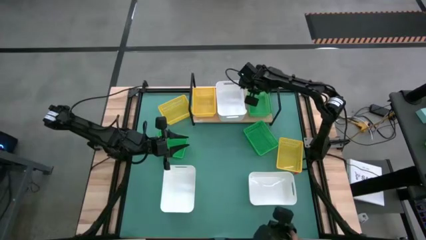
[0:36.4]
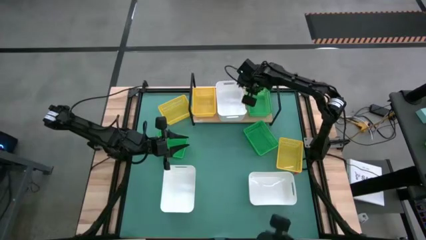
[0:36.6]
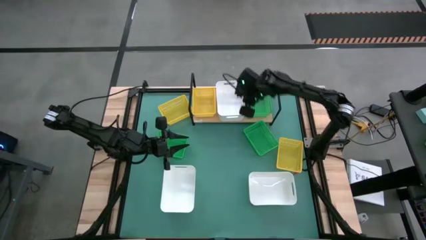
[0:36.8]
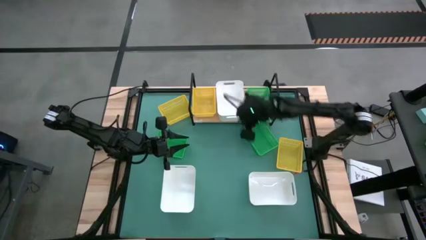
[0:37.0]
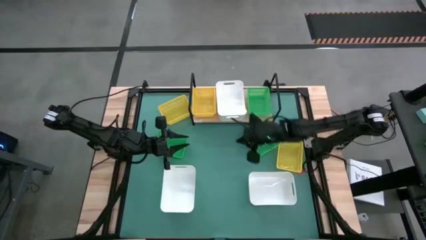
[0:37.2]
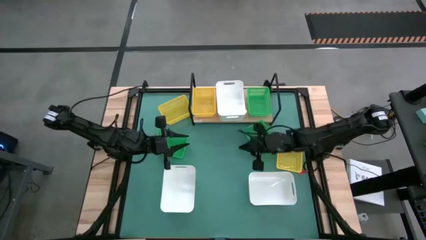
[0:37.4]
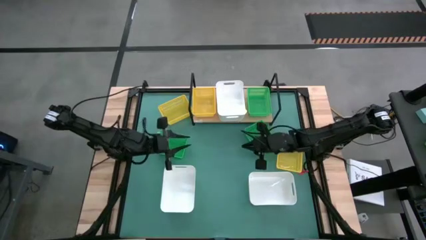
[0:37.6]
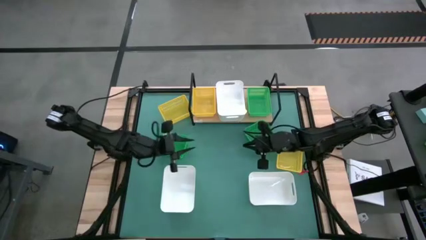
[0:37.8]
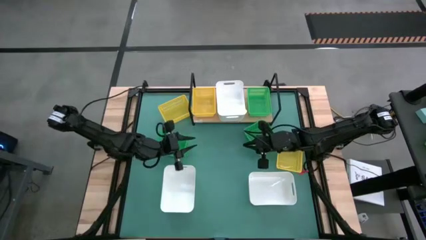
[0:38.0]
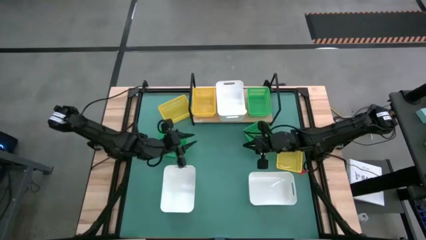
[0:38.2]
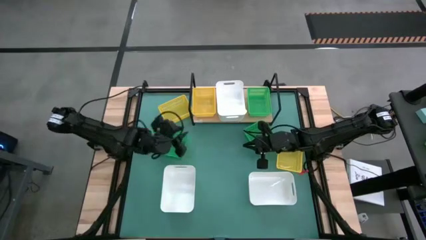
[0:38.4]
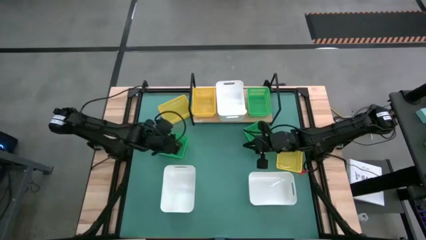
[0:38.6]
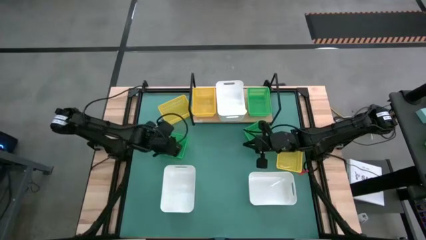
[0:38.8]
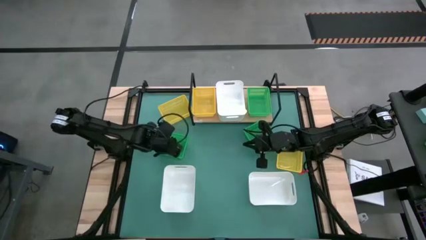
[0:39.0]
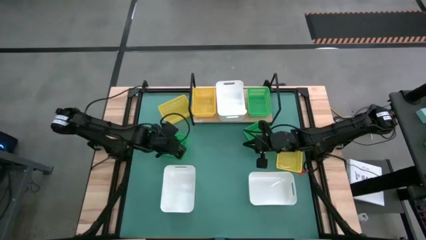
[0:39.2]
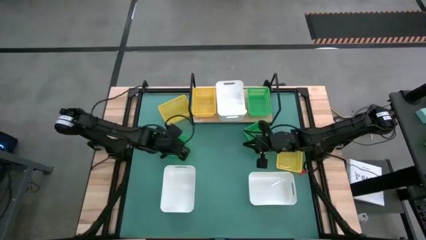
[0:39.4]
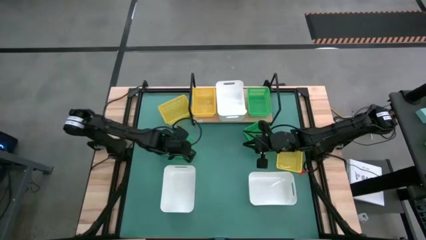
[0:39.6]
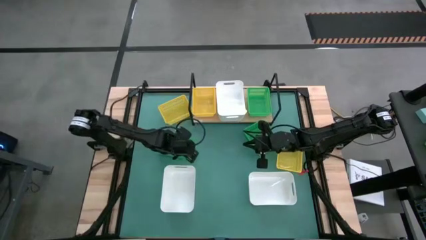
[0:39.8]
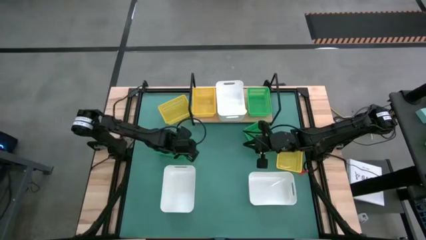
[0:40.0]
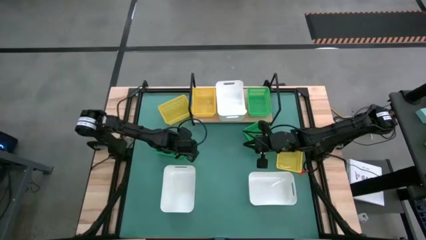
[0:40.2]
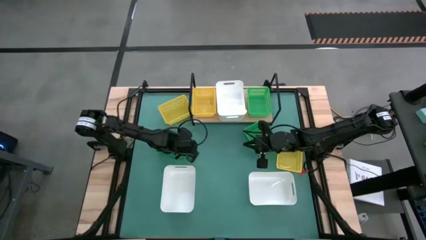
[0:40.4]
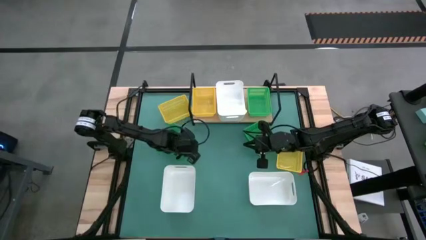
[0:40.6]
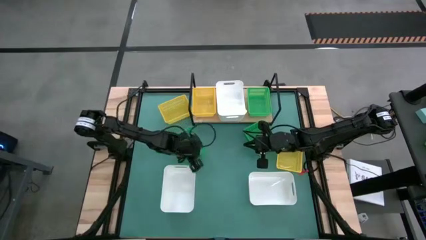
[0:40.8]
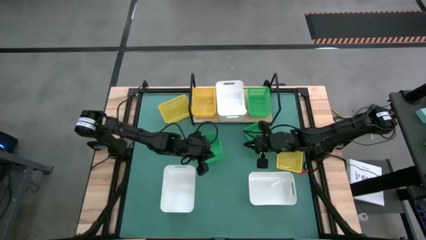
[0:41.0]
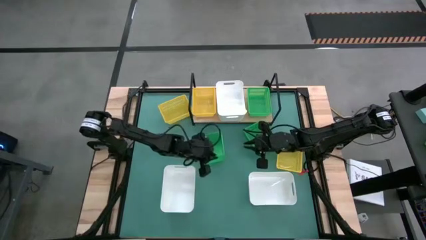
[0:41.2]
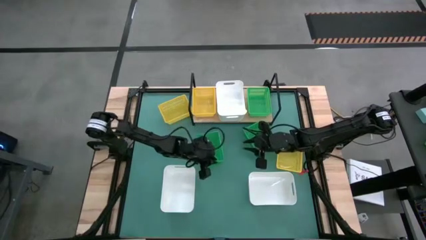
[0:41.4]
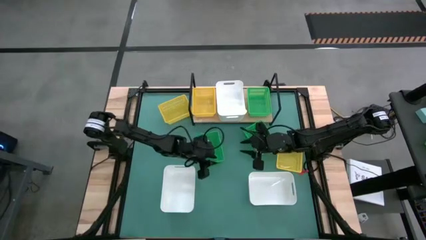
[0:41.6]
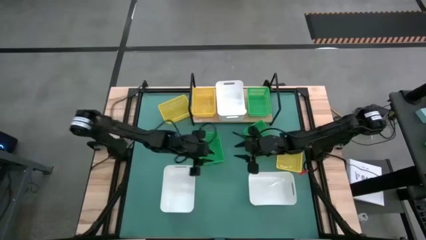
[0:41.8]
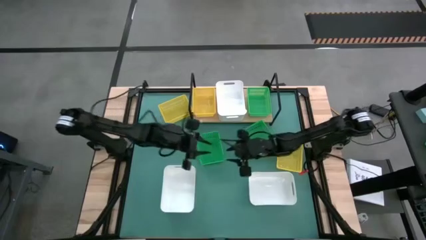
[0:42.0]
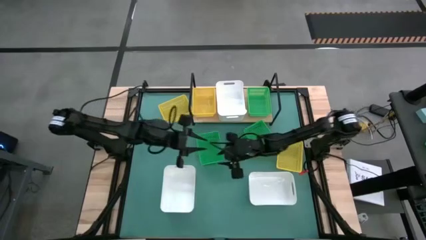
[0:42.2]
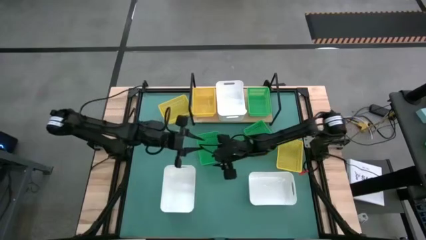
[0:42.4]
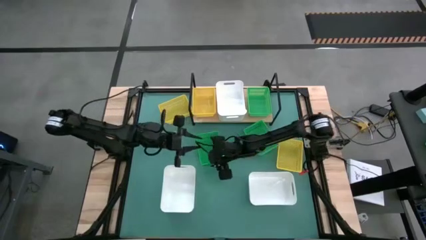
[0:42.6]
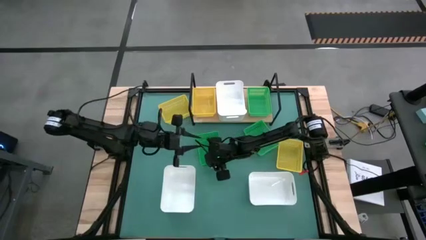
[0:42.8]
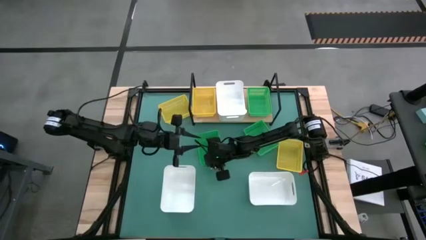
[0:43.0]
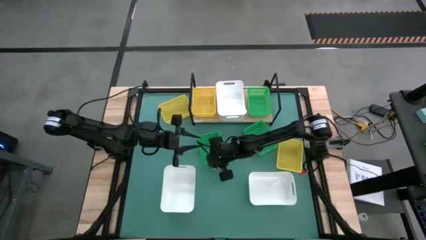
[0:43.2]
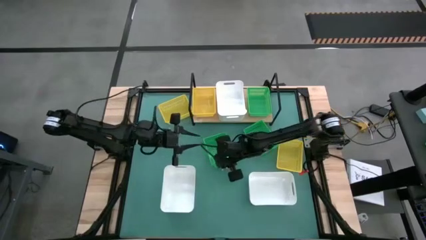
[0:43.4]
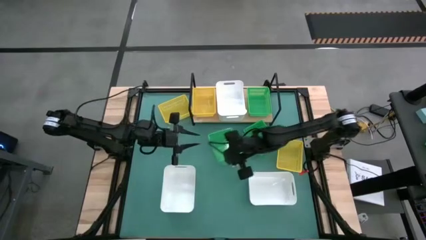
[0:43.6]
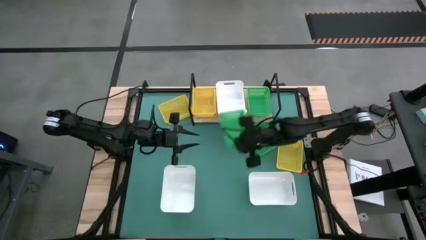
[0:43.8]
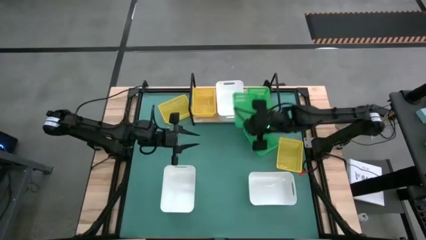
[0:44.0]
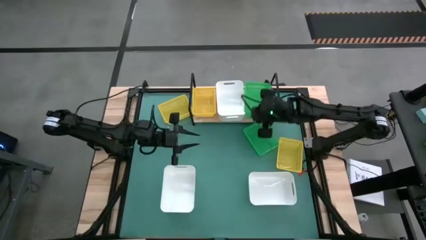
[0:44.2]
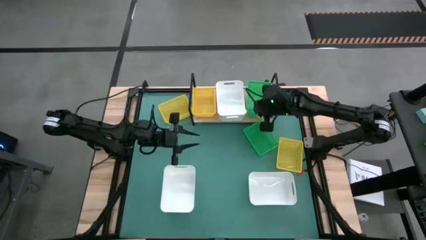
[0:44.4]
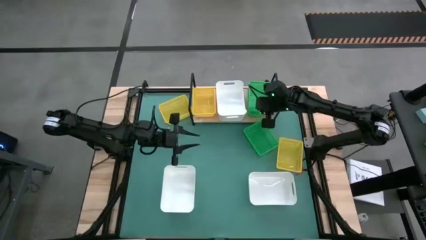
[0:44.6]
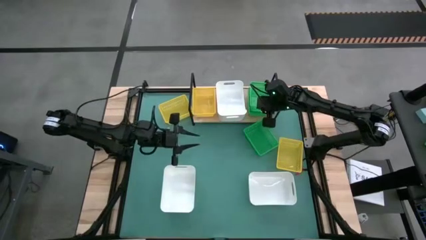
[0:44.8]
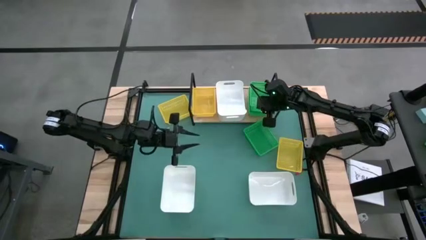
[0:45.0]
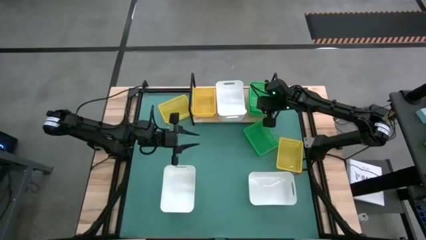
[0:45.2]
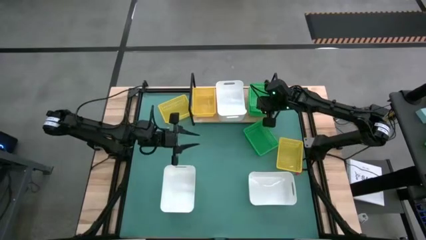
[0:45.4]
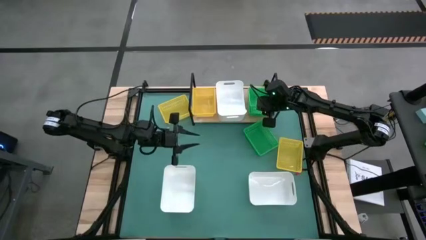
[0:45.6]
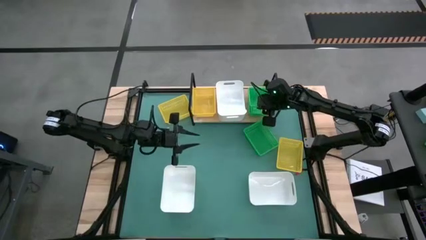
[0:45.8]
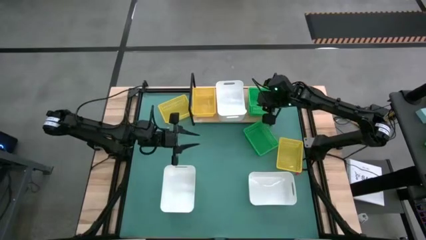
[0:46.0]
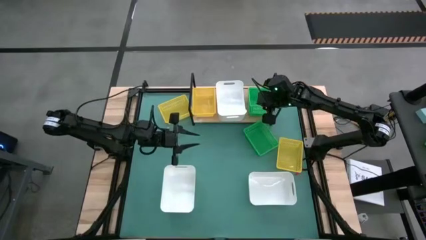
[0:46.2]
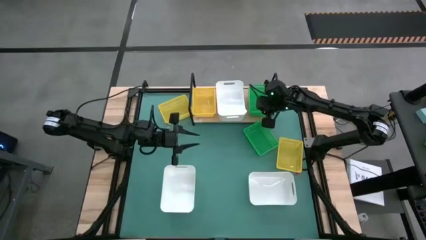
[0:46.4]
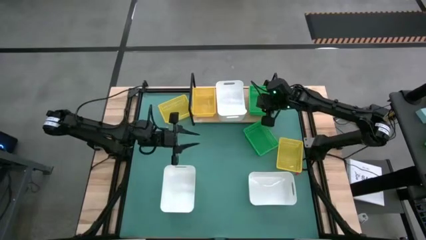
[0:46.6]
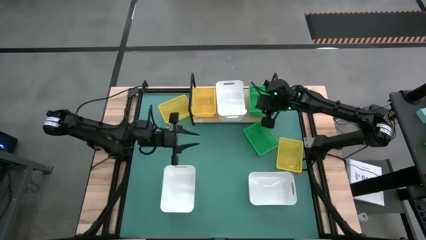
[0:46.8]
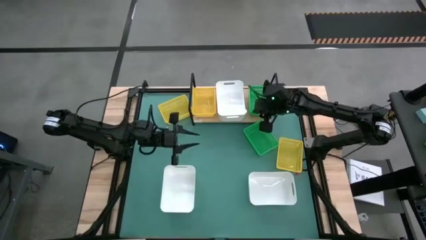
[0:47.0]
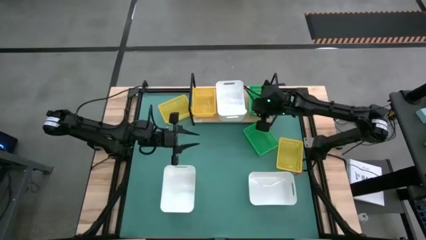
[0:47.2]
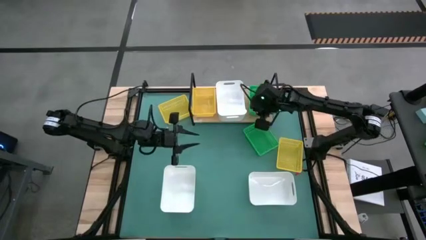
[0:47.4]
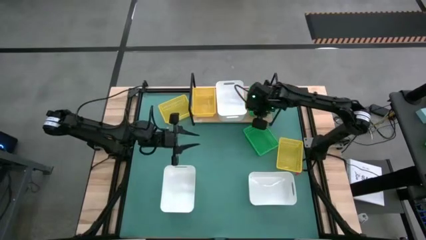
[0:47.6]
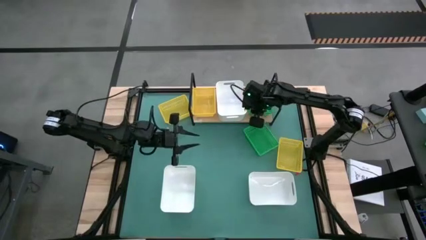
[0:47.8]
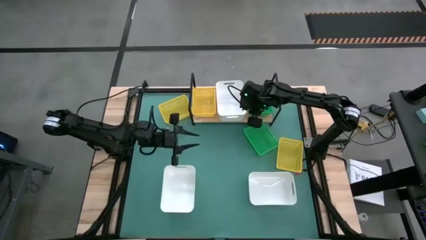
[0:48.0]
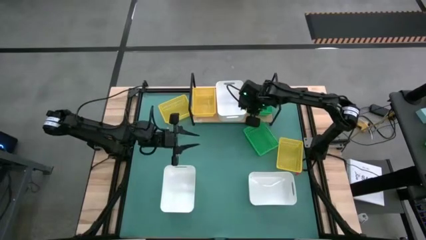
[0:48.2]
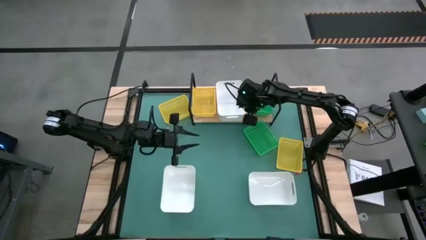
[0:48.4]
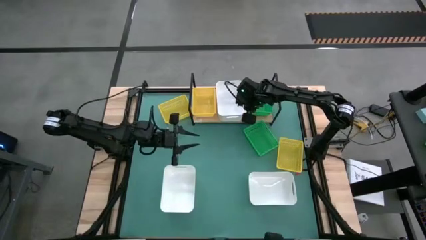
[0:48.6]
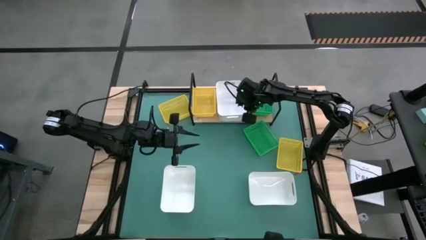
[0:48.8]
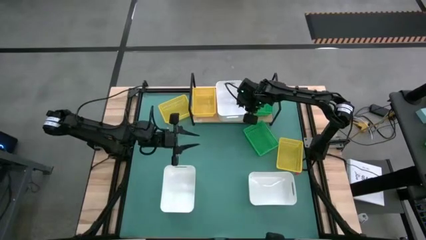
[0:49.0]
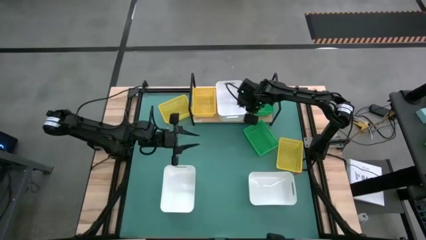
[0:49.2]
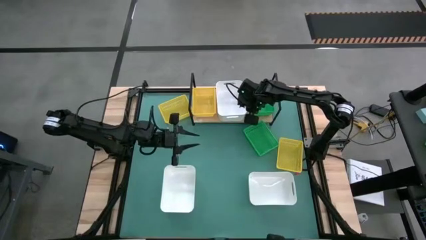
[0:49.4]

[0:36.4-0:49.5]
Task: Stack baskets on shelf by color
Stack the left green bin on top of the green bin on the shelf

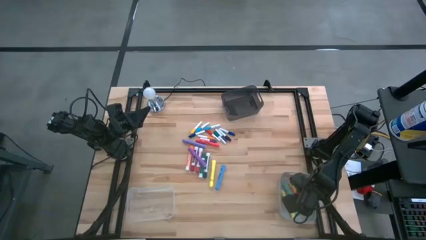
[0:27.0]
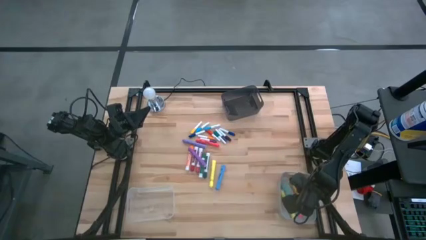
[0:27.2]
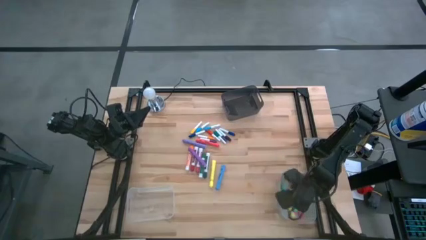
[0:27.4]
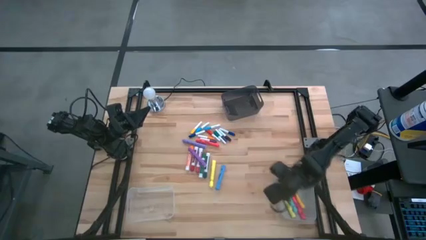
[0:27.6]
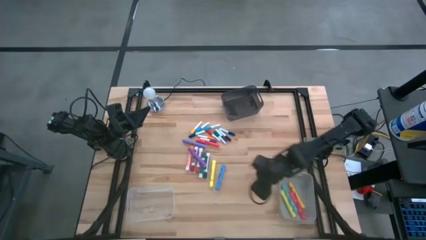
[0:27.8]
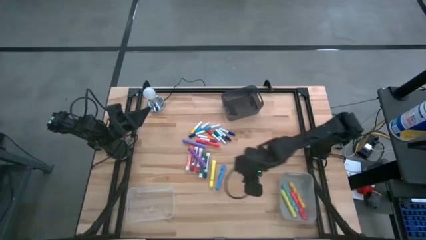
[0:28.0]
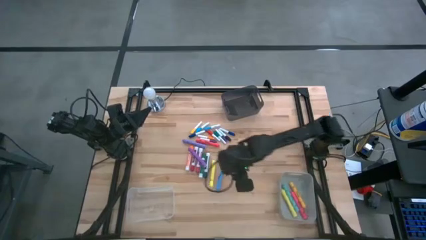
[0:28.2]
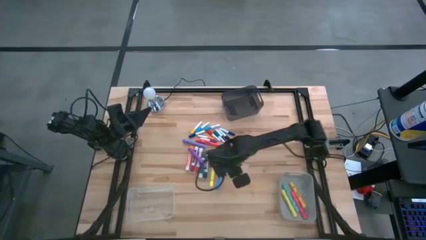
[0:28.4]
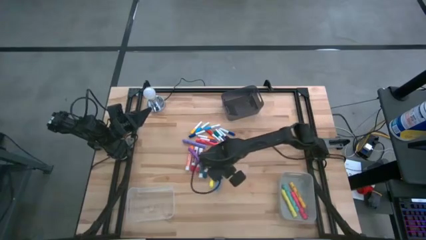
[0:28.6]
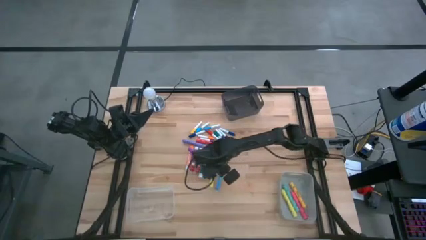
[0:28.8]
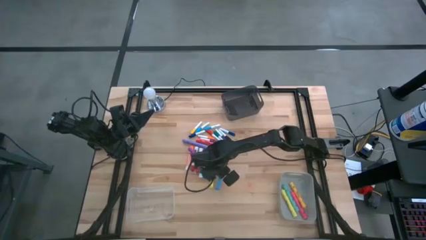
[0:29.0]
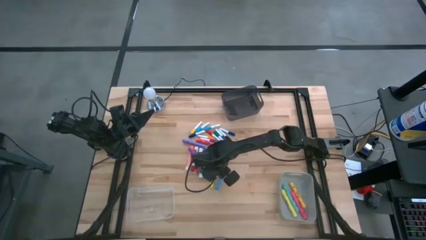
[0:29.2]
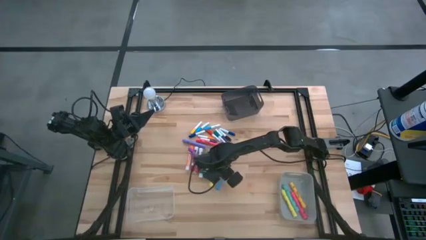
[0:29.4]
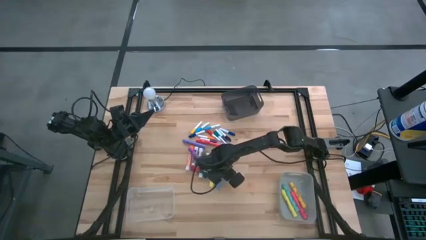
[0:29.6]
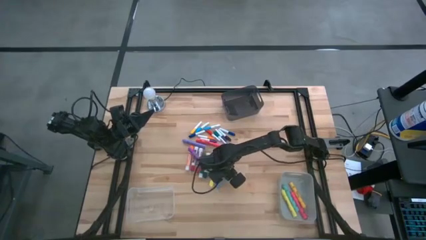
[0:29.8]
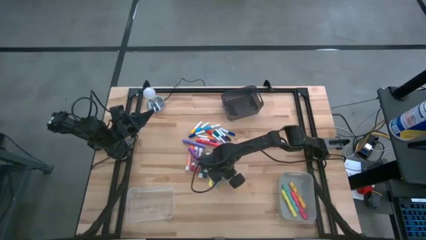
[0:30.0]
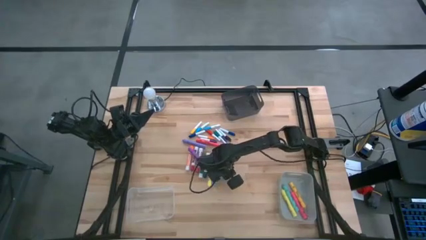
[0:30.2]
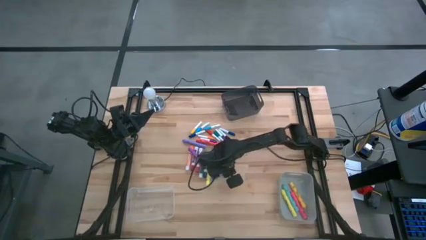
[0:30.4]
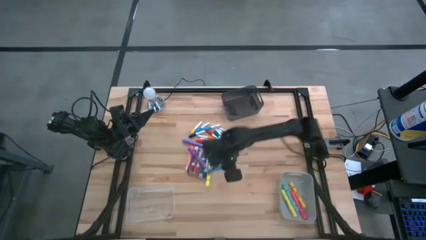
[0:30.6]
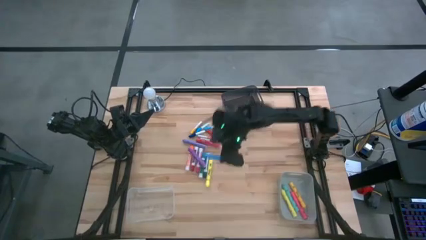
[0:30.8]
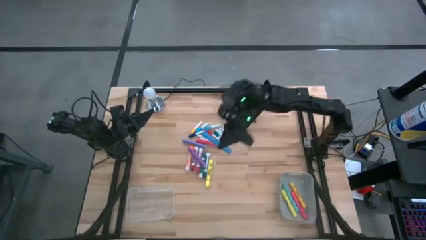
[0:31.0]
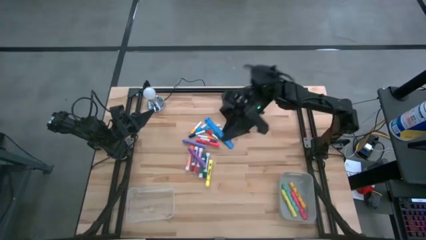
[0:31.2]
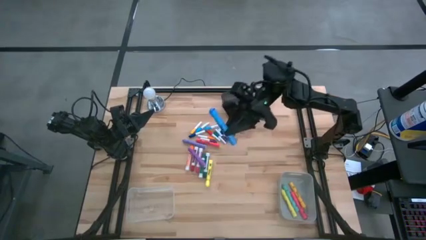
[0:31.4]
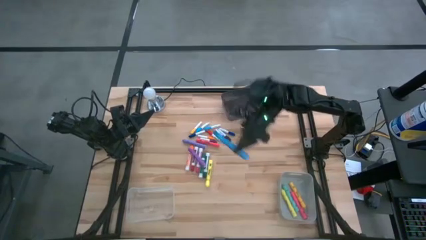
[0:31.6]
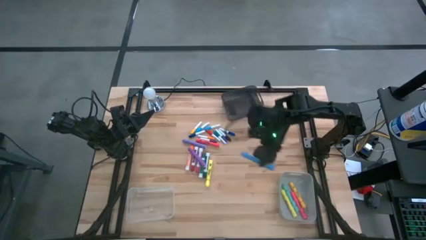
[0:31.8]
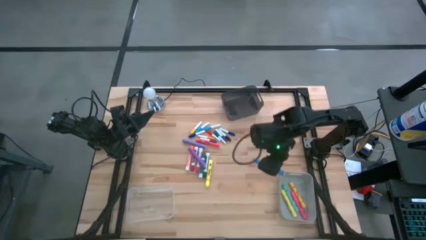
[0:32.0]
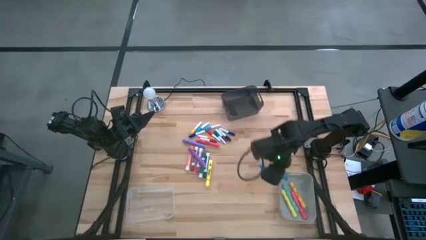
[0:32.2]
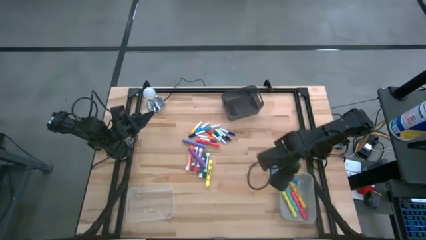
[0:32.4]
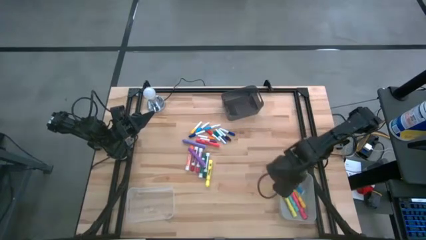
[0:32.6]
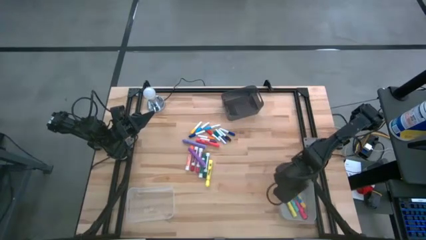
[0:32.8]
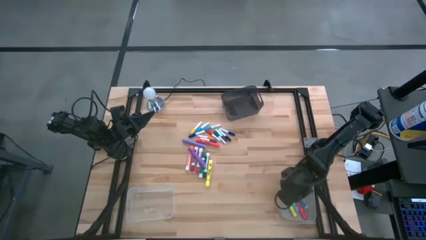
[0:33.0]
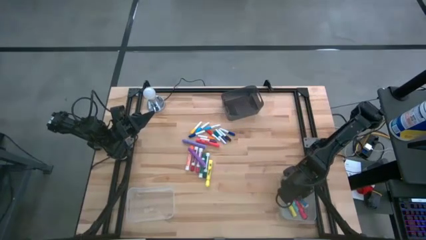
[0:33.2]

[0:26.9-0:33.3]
Task: Pick & Place Markers
Put the blue highlighter pen into the gray bin
